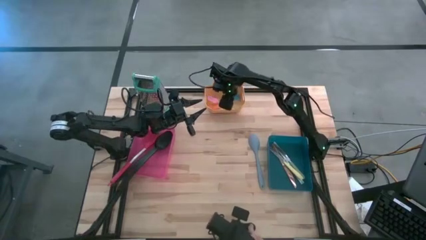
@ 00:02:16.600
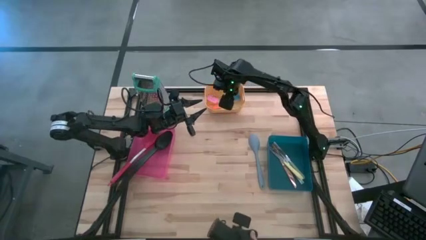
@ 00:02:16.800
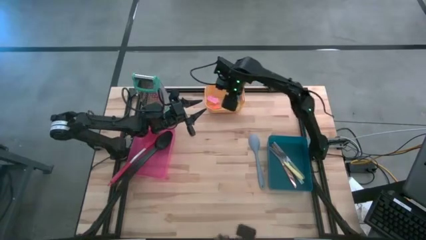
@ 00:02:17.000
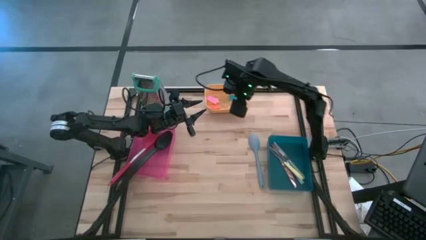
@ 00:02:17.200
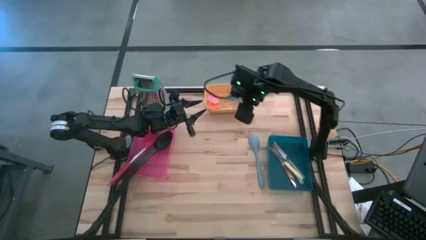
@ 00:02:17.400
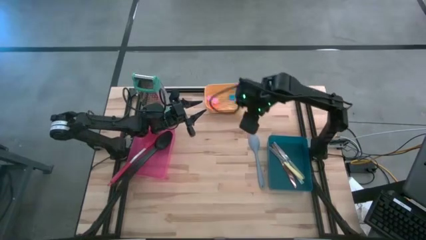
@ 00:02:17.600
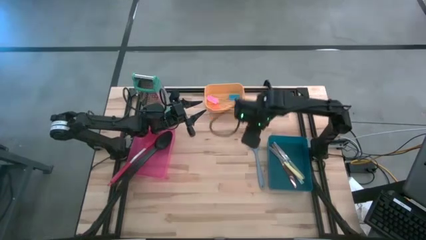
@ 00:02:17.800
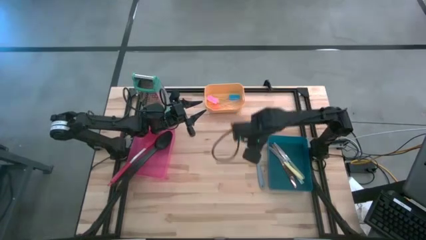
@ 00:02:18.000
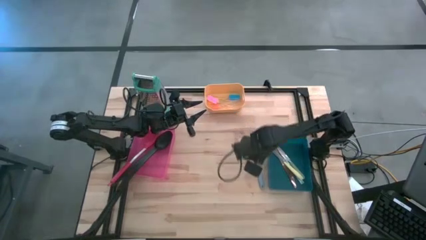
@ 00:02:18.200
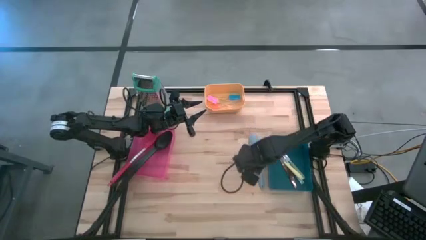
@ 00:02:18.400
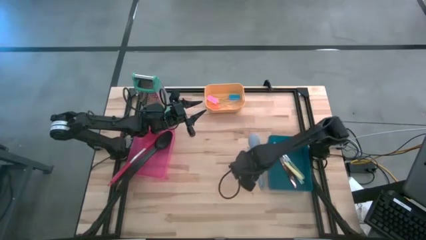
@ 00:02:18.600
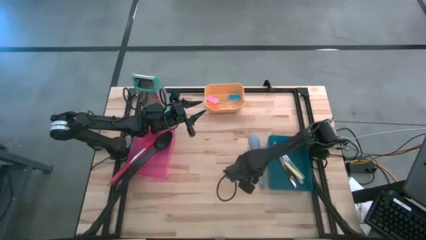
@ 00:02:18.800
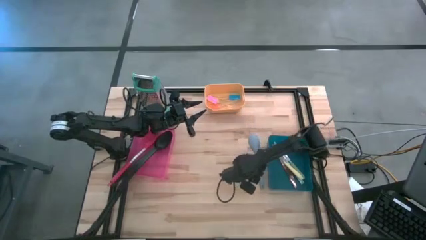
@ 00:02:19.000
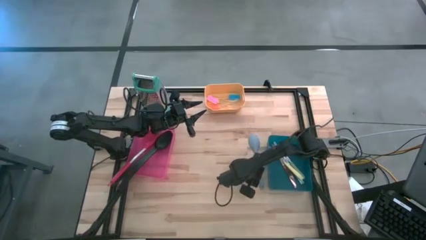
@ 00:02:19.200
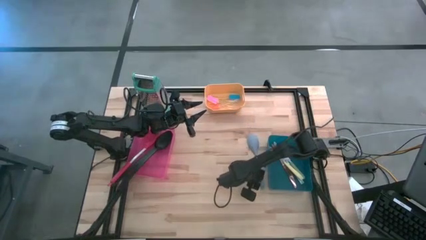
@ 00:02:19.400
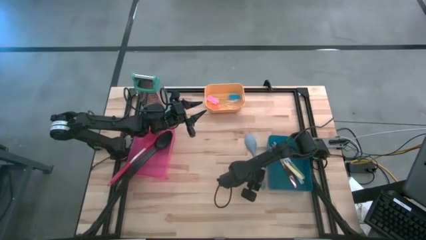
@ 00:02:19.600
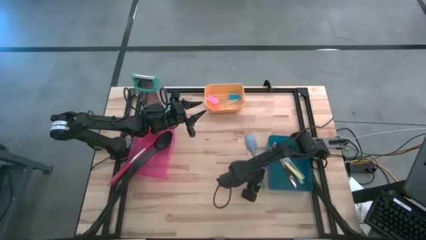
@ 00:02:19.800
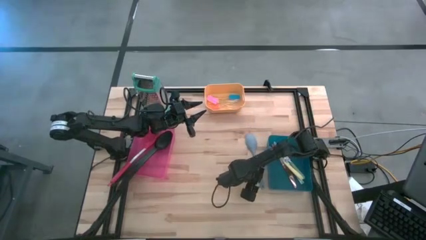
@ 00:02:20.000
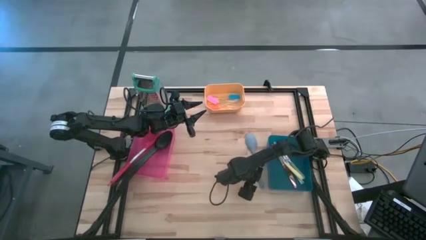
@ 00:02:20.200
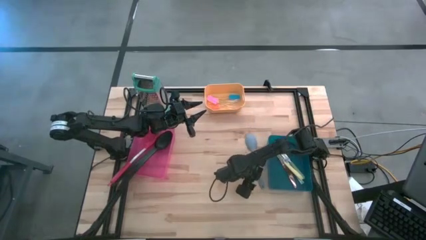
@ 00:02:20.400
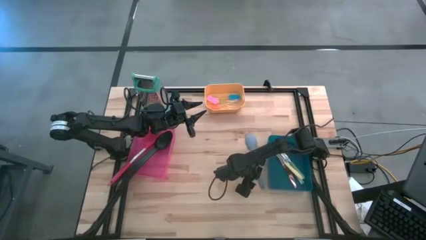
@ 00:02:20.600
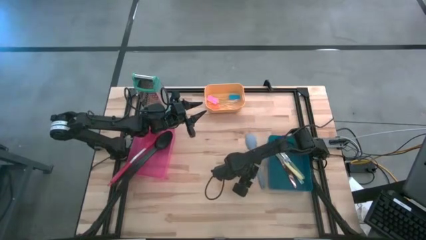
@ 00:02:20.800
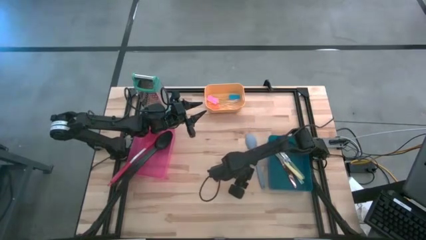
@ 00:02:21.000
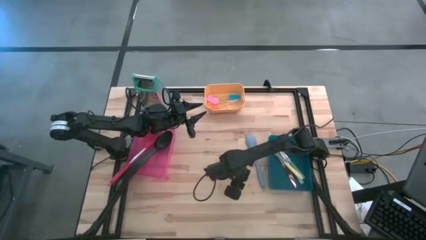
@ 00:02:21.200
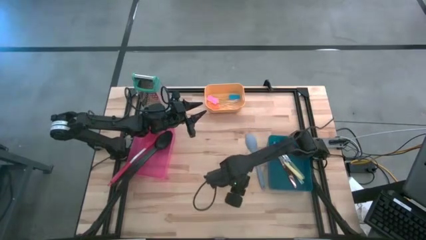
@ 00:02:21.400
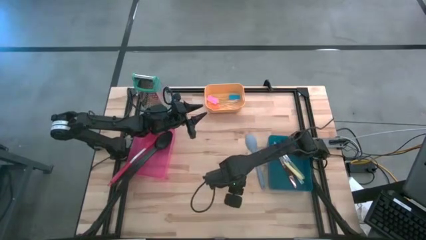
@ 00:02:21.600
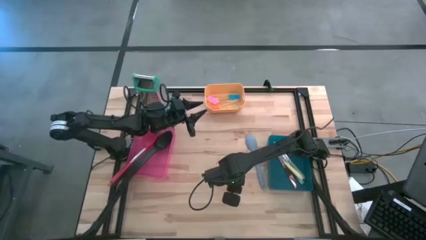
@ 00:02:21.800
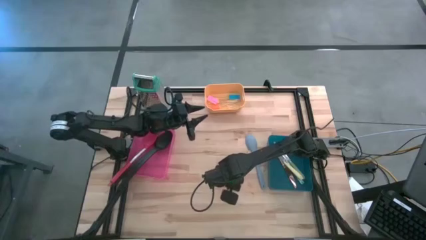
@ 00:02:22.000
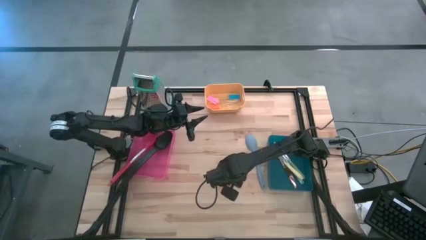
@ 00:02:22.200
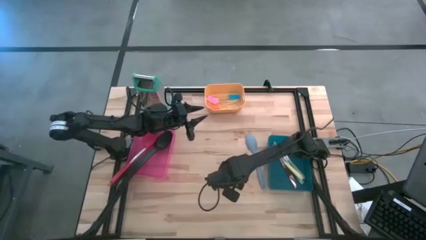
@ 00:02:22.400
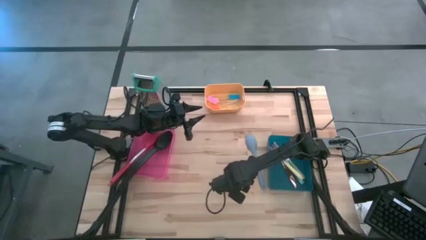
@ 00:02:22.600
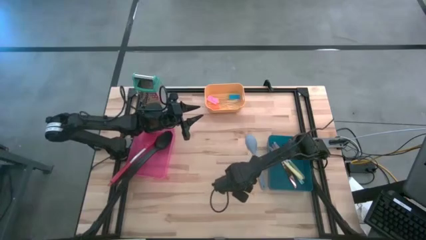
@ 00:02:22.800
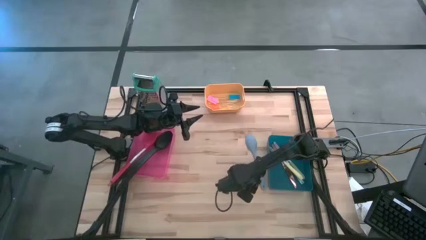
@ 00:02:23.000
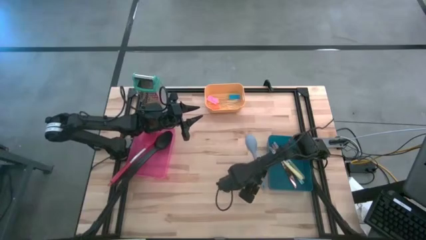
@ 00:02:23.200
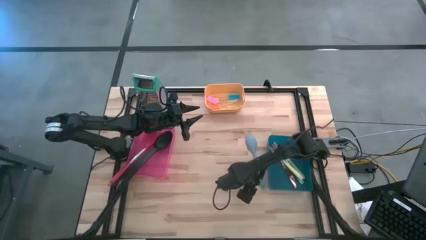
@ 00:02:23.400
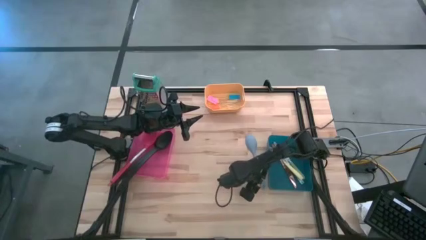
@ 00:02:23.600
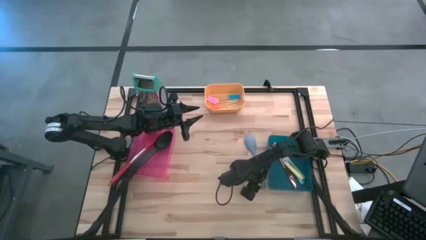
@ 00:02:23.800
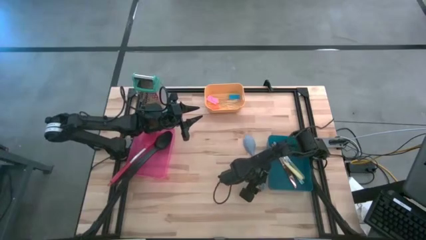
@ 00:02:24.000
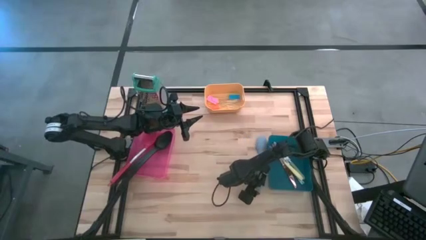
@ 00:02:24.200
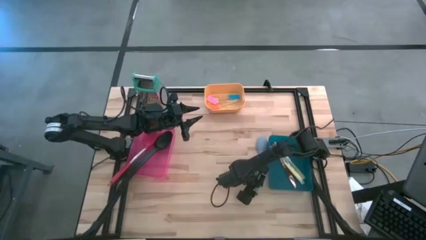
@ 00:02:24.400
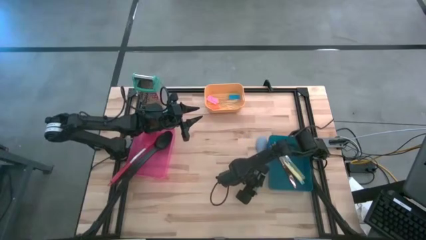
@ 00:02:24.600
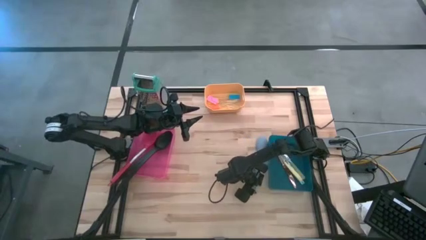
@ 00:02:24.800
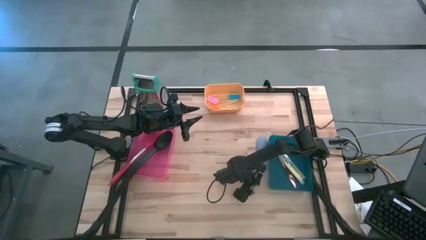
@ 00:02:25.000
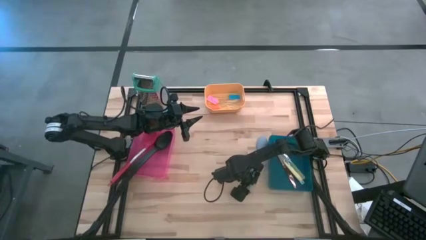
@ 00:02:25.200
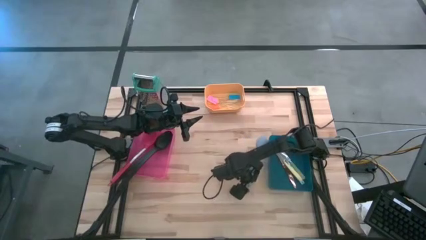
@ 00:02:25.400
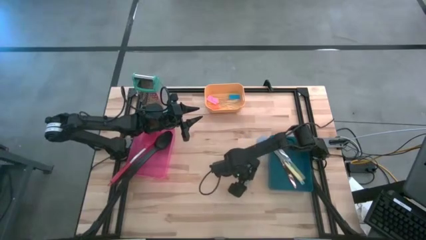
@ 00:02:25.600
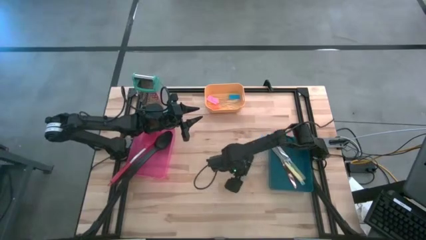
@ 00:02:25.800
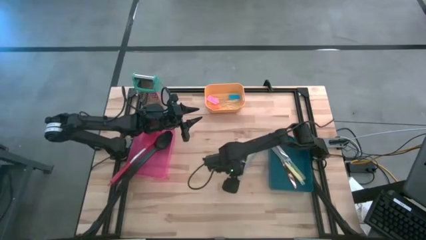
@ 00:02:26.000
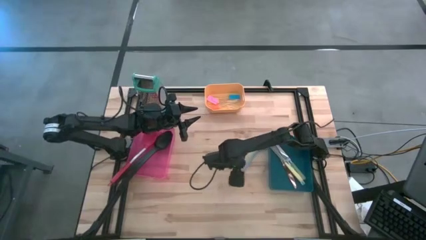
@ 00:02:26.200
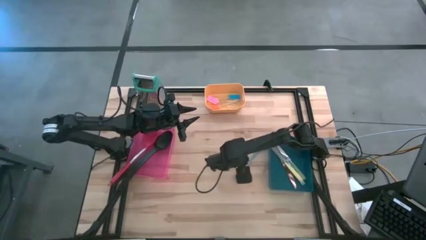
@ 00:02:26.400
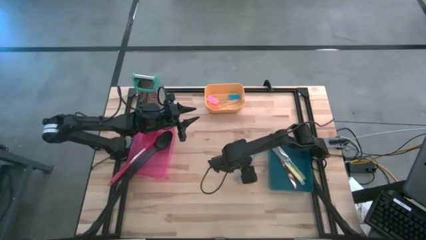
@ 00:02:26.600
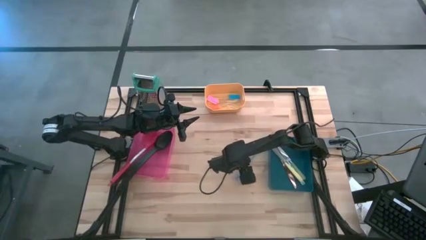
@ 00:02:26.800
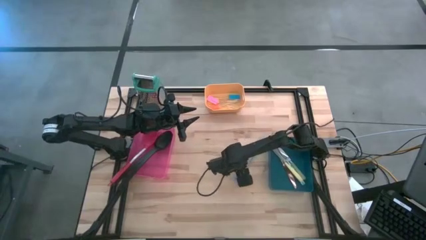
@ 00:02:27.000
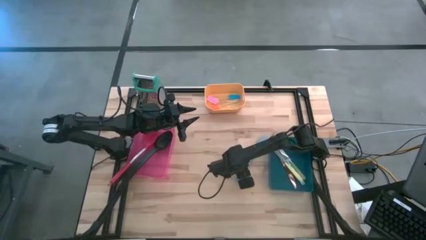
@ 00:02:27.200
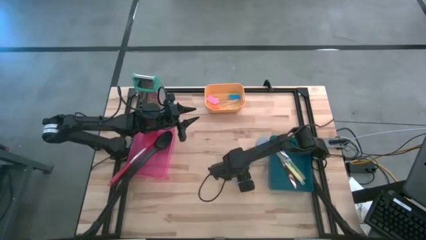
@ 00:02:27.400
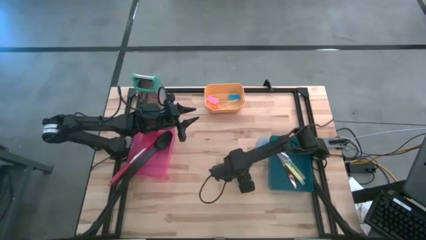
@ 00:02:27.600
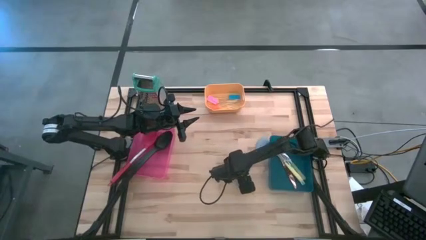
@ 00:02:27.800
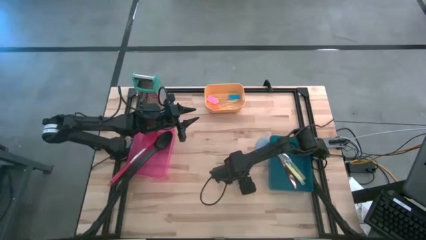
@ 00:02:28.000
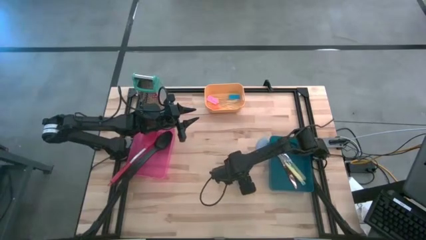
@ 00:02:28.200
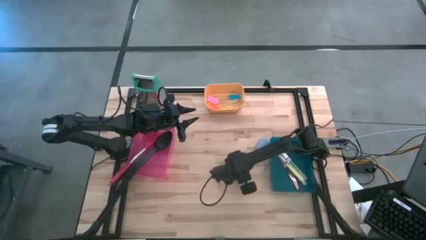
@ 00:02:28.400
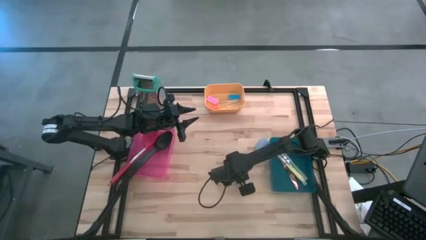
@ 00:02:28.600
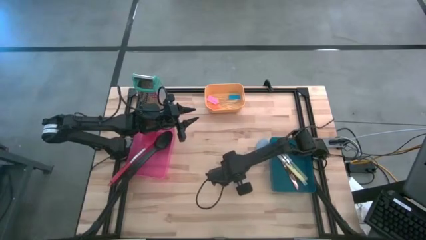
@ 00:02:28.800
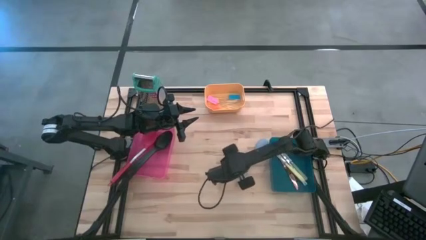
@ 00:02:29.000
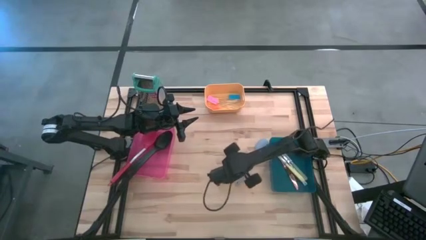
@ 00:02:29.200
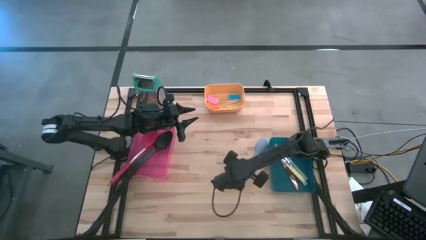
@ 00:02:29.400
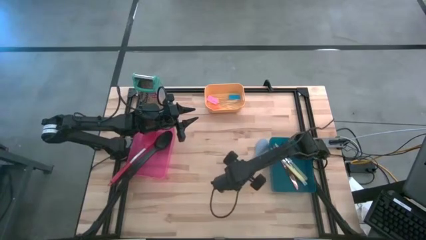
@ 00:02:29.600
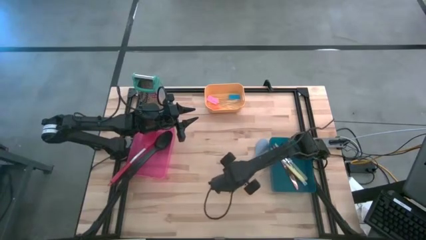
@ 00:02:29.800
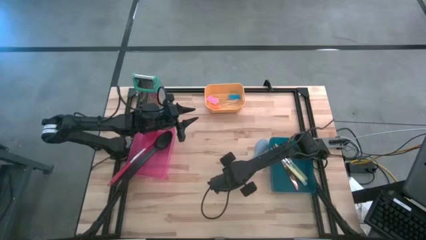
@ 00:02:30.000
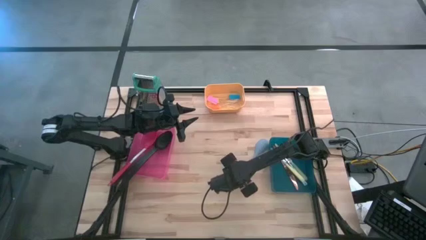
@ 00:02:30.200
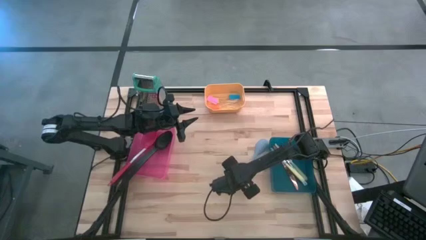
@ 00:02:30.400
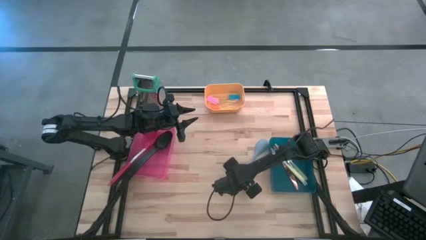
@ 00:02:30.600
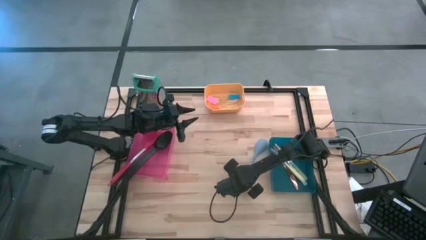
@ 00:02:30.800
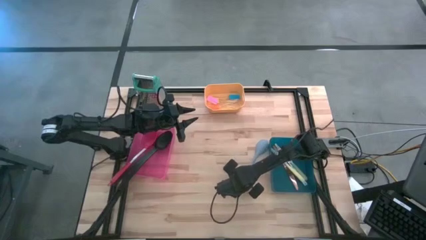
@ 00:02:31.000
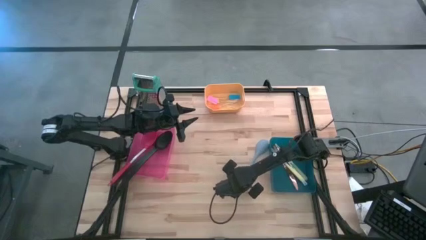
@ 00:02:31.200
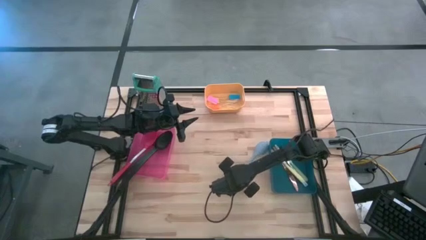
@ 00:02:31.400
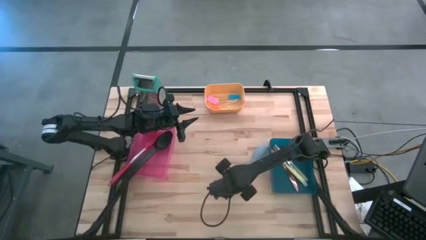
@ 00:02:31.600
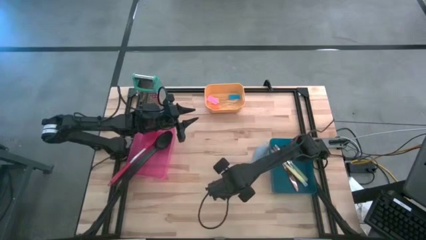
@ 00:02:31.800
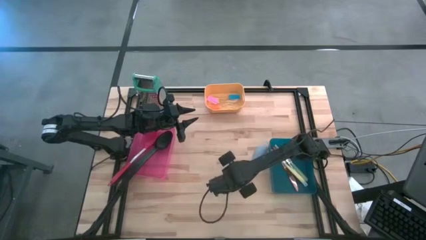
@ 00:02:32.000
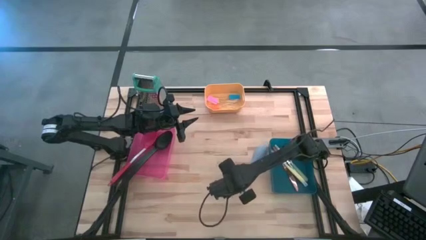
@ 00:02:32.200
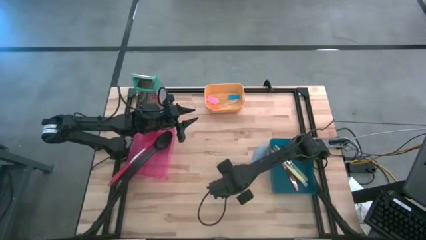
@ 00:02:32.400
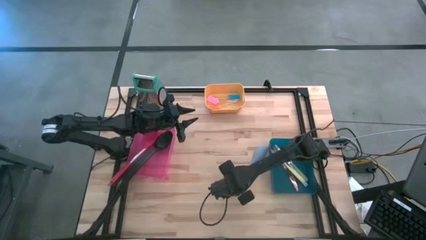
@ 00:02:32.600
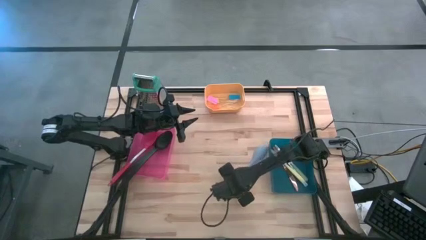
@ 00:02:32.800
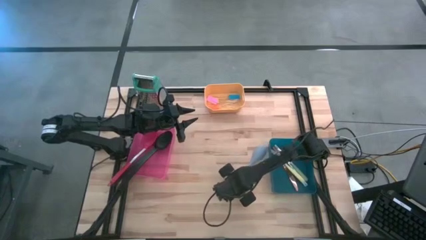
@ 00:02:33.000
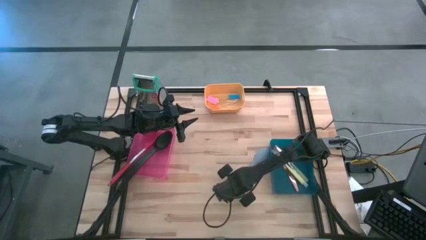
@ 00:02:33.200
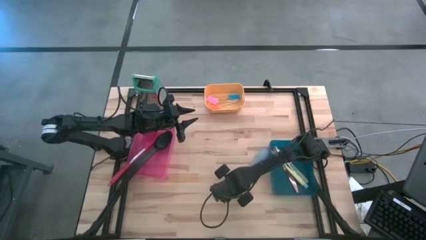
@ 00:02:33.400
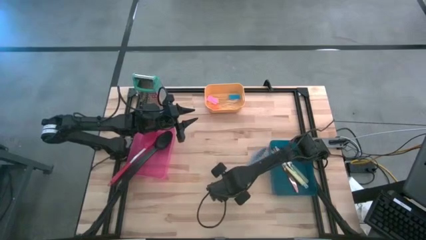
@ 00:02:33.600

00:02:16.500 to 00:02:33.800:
Task: Pick & Place Kitchen Items
Put the gray serving spoon into the pink bin
